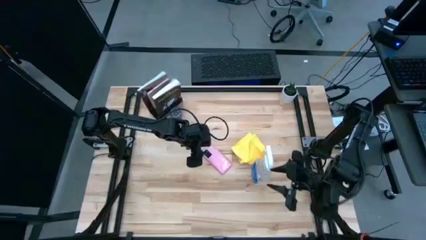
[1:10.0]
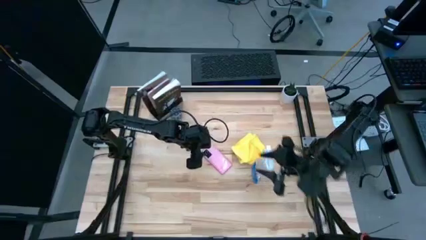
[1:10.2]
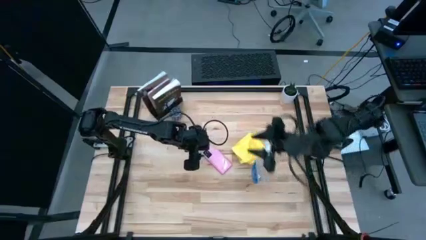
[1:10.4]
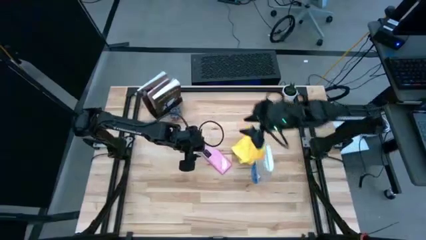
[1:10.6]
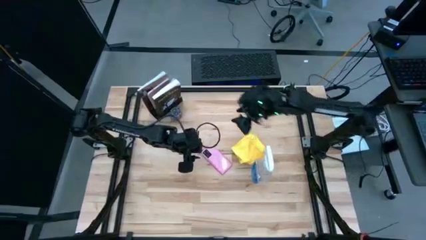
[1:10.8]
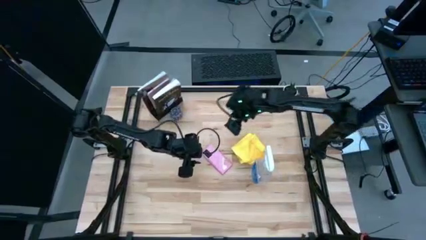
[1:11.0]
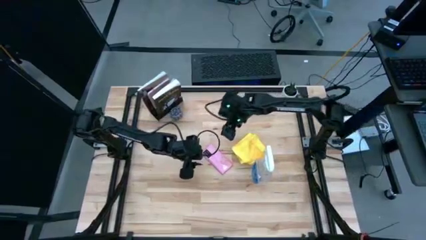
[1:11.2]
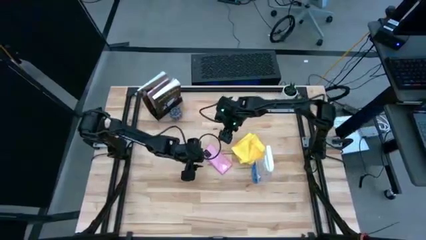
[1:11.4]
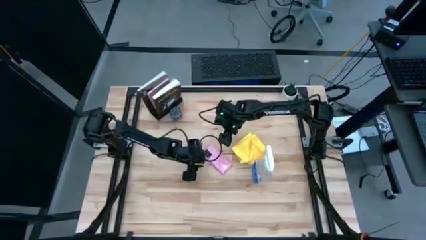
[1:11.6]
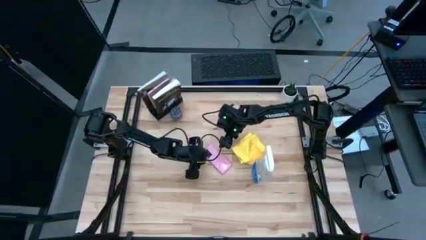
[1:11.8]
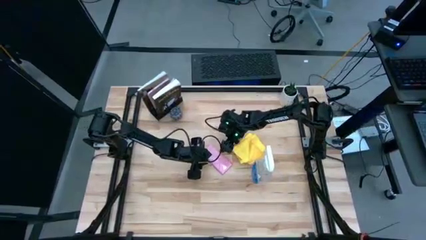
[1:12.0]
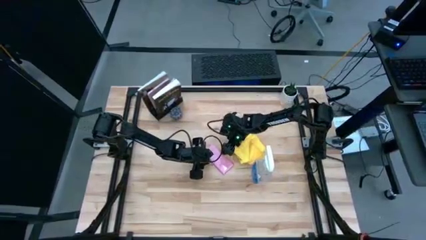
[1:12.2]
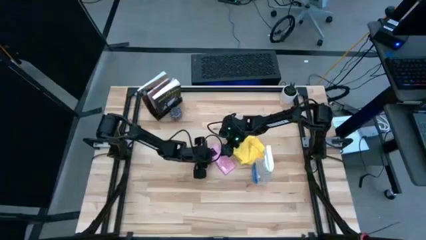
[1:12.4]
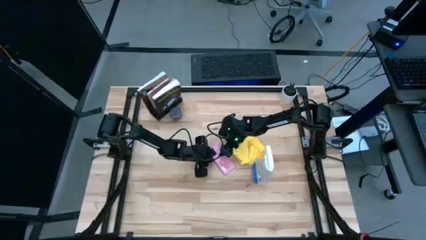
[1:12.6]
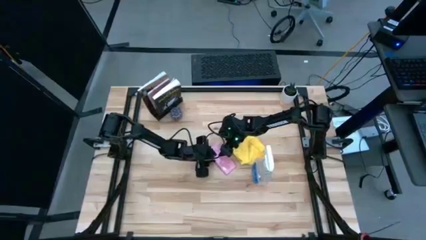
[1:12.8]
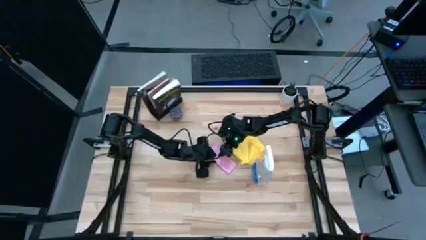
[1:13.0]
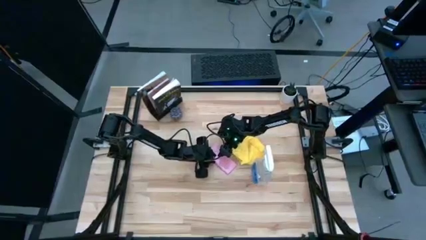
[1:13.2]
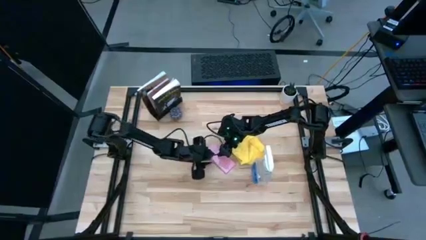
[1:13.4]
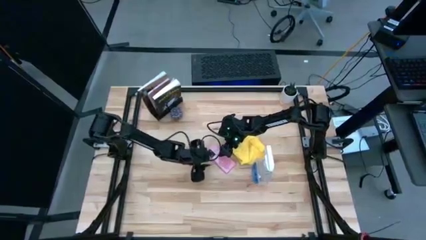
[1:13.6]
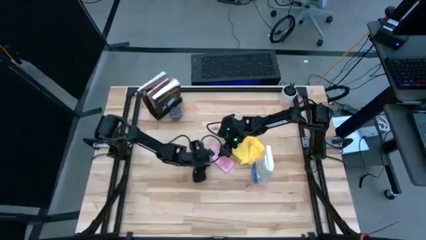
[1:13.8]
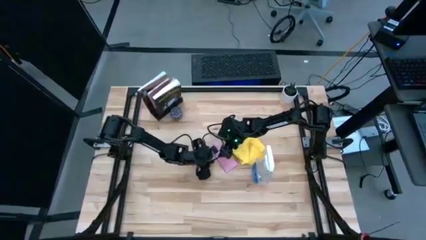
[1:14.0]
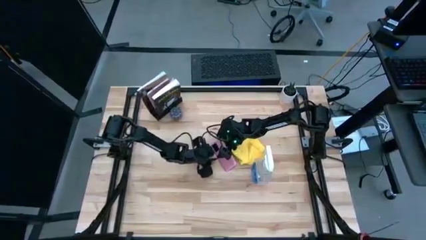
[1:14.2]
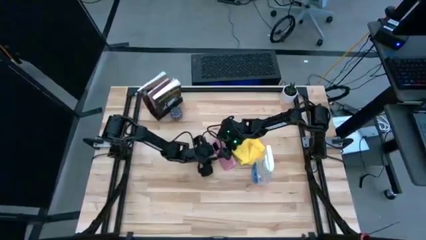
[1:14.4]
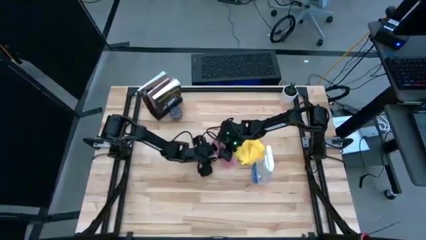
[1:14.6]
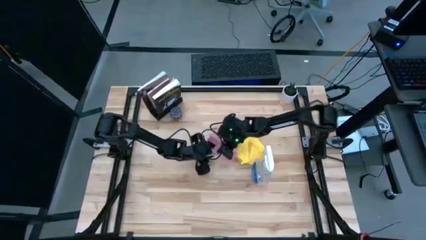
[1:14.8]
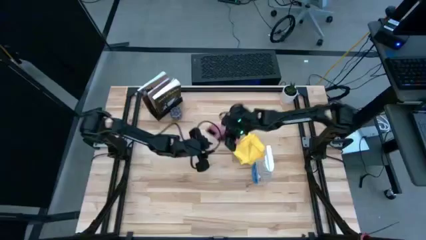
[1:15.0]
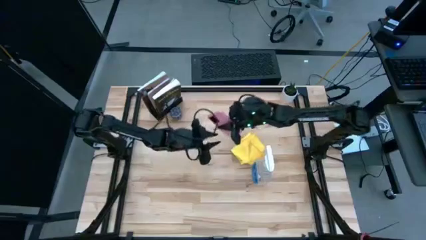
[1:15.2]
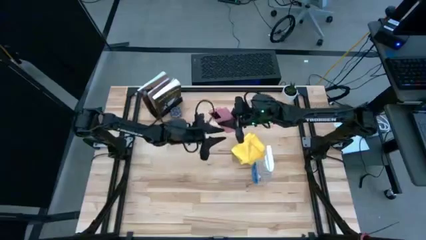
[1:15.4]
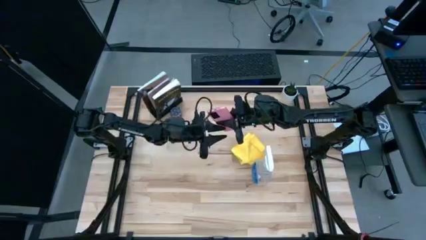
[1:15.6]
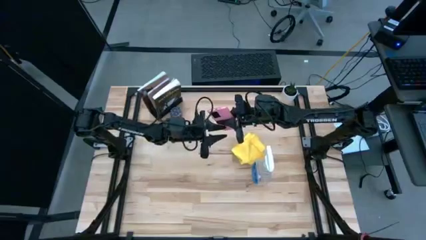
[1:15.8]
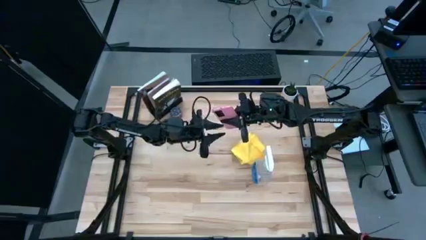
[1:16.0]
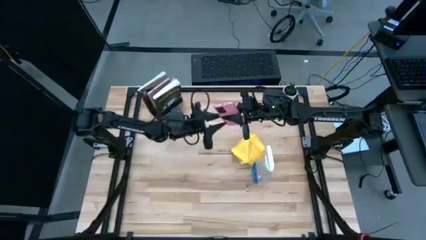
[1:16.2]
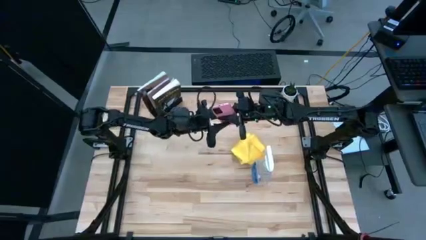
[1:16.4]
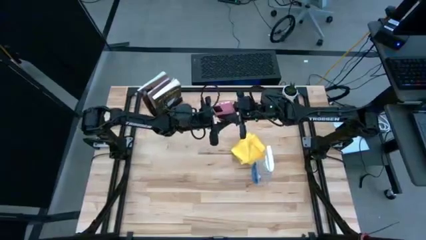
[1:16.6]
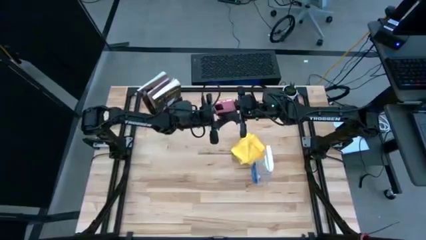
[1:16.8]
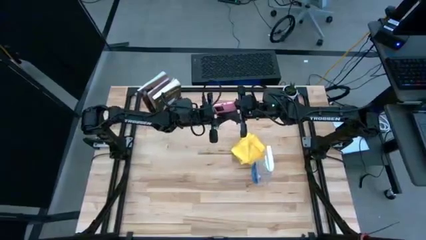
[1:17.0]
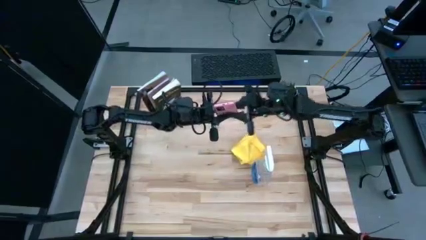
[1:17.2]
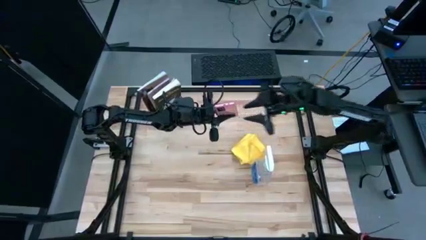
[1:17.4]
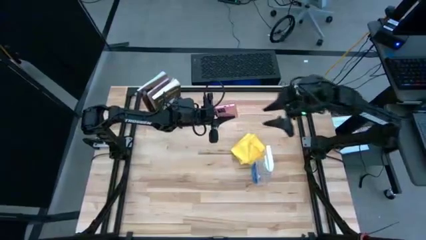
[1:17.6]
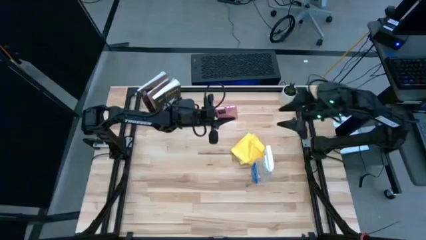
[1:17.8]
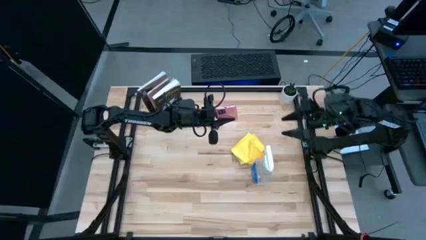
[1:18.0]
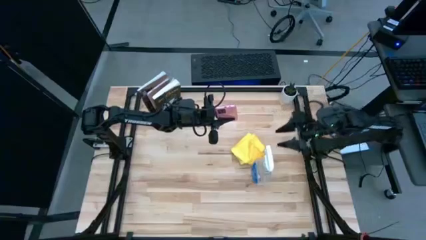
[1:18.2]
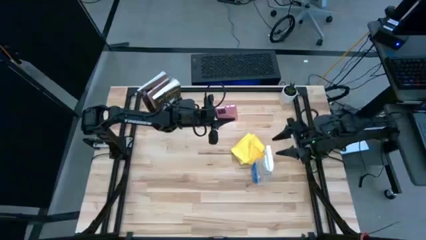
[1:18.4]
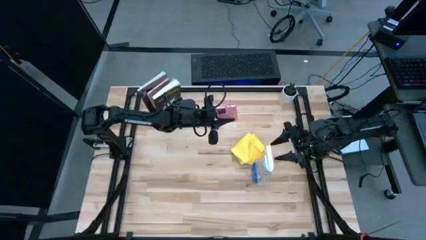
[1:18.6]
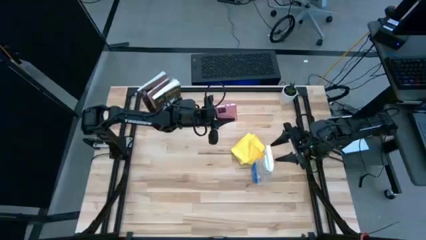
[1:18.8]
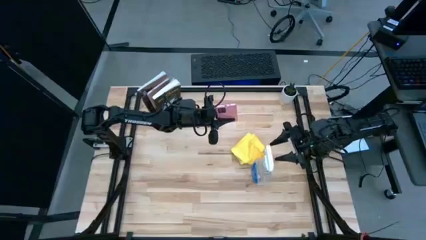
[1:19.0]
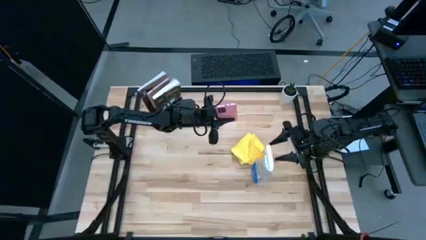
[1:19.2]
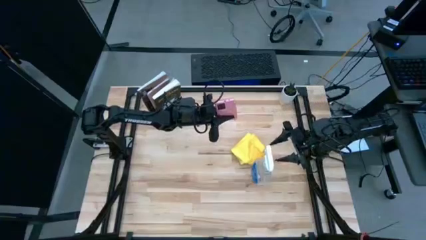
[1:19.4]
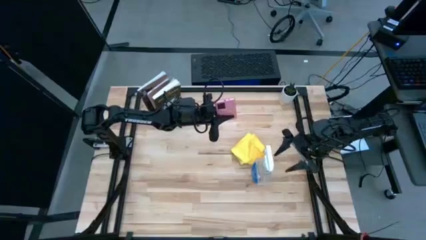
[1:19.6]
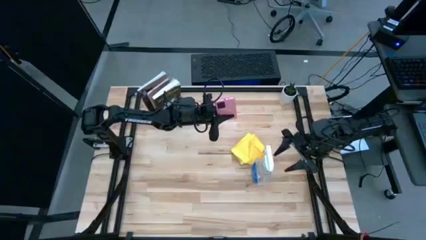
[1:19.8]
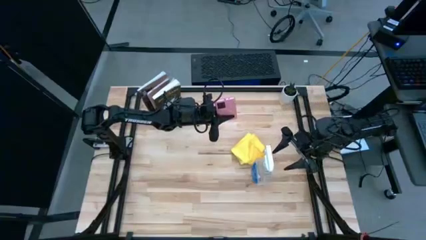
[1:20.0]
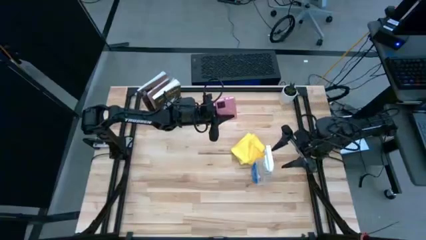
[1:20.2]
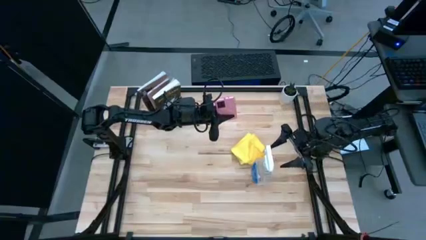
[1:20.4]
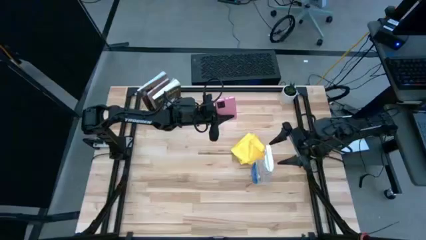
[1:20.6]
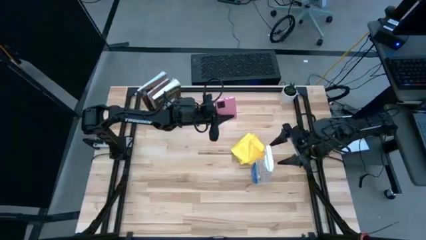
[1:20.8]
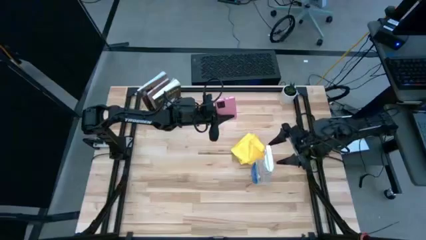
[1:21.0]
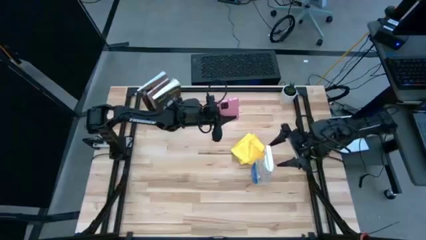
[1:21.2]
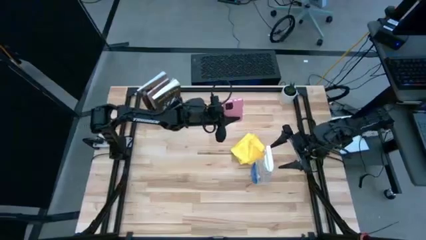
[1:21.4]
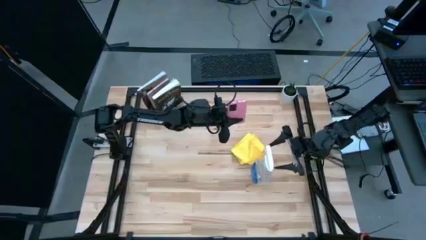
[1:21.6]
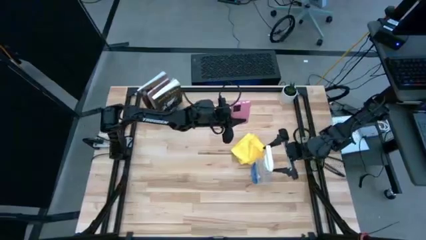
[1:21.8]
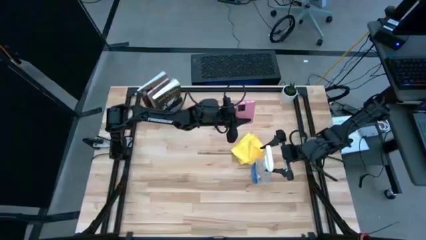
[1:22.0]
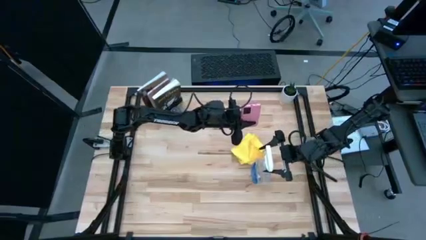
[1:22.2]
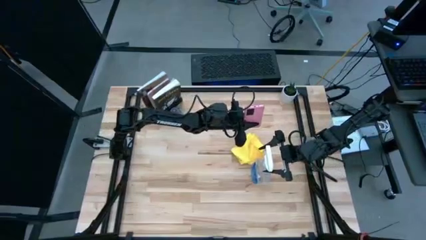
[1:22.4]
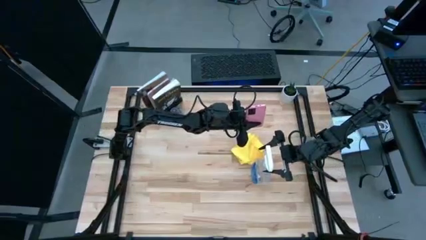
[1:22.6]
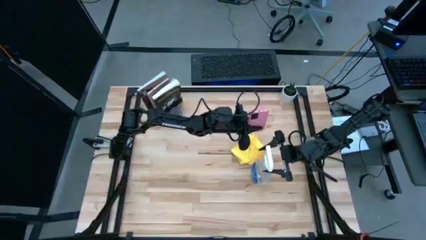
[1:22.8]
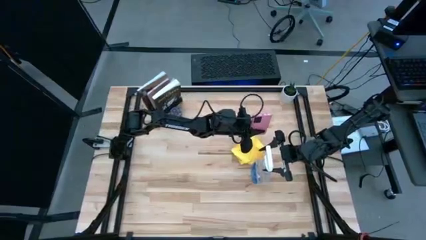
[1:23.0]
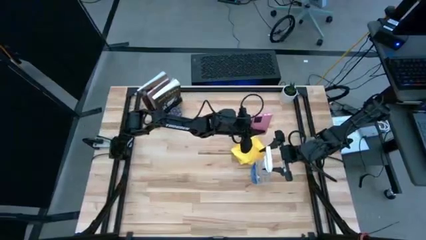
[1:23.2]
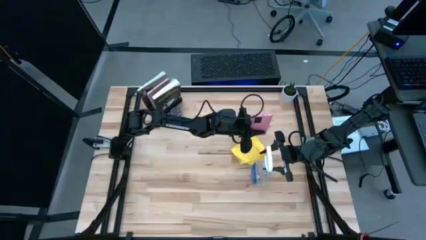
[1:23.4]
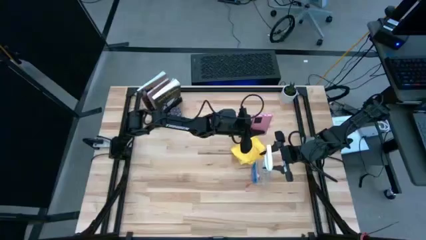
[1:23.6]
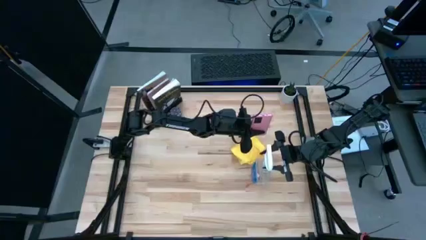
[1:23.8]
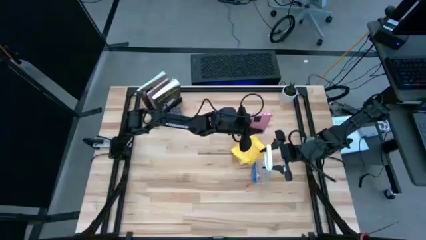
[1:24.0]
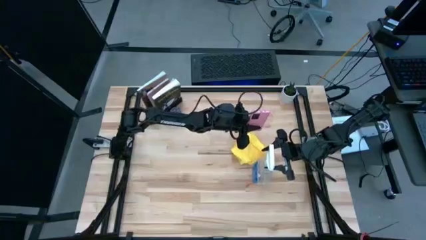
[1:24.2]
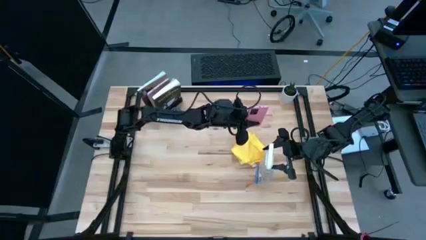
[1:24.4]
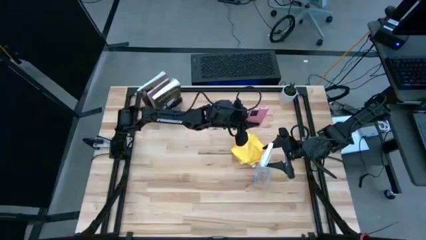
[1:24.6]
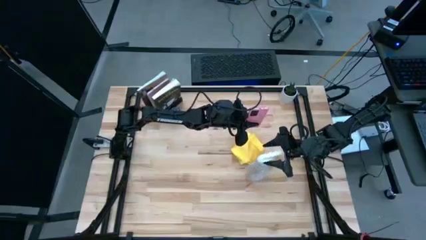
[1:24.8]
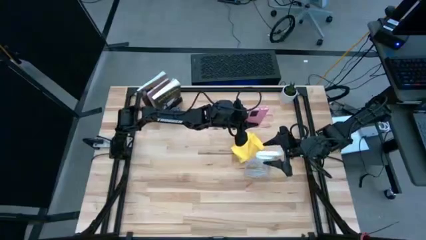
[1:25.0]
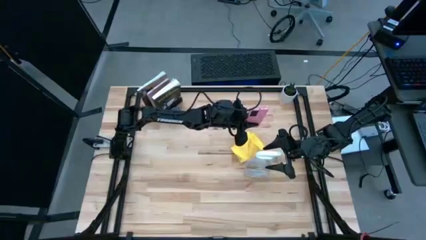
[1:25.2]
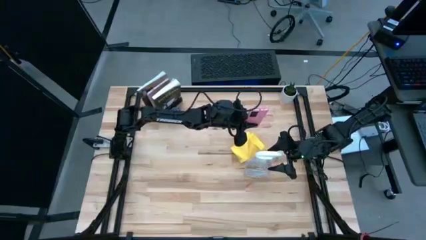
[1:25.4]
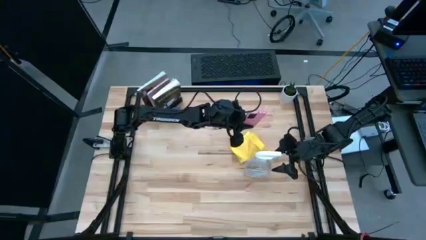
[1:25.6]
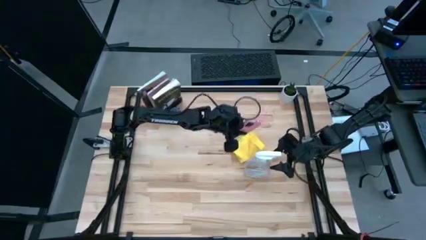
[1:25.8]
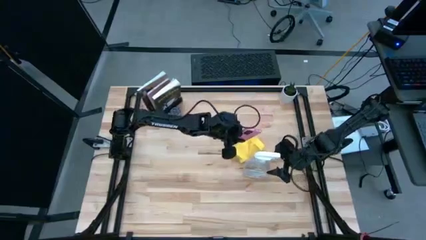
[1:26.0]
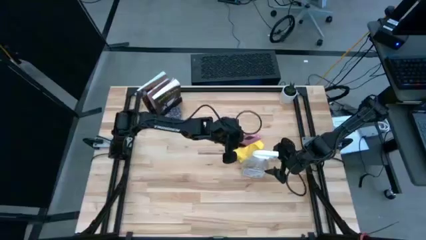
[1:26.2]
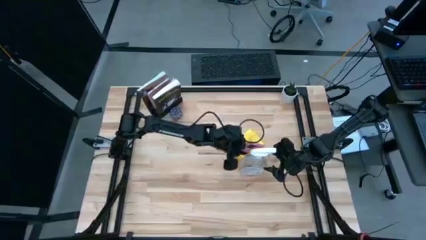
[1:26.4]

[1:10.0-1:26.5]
Task: Apply microfiber cloth
Spray the back of the pink cellphone using the spray bottle
